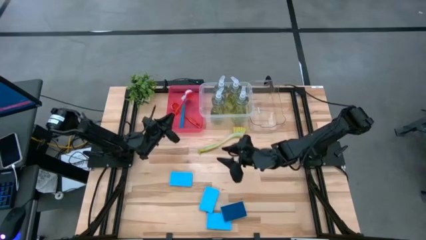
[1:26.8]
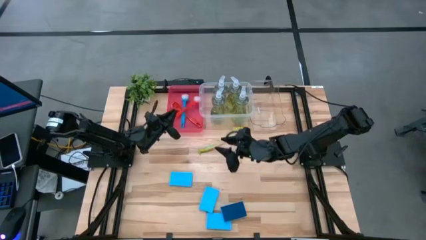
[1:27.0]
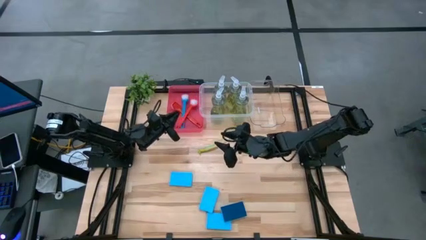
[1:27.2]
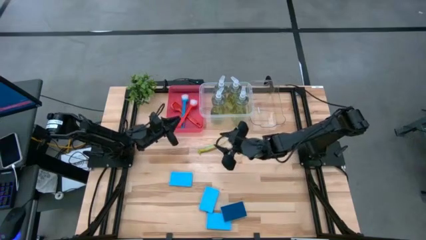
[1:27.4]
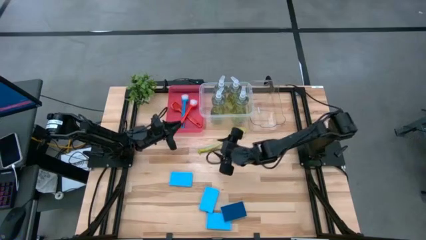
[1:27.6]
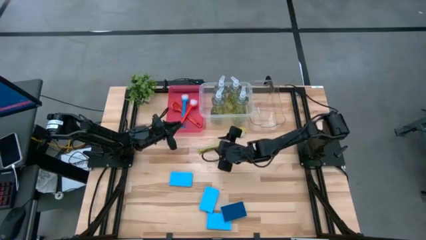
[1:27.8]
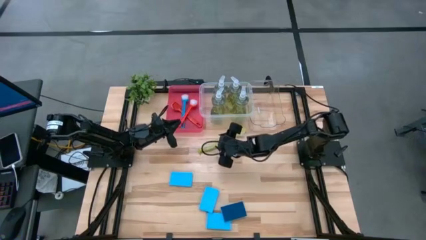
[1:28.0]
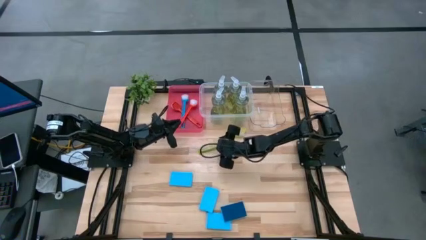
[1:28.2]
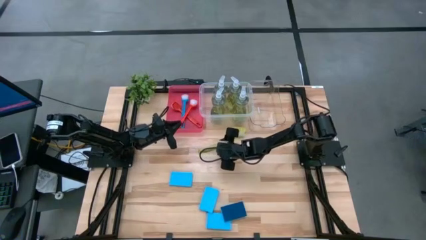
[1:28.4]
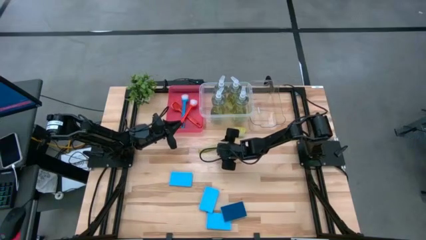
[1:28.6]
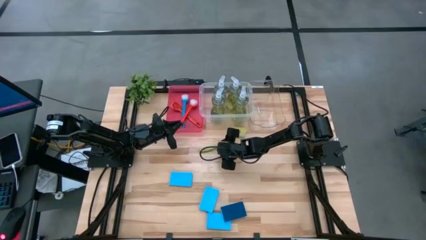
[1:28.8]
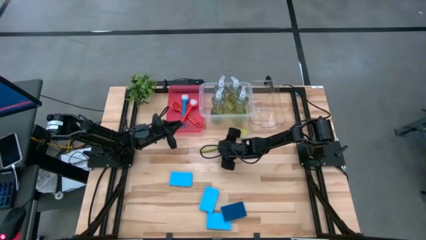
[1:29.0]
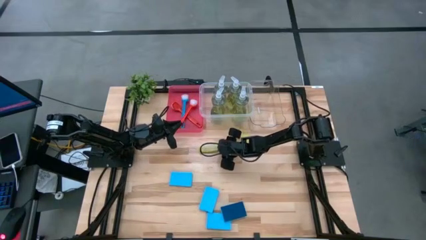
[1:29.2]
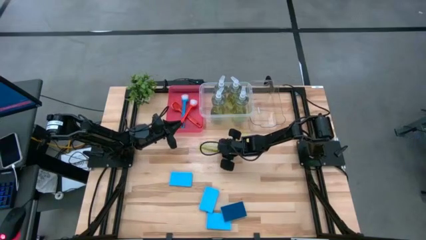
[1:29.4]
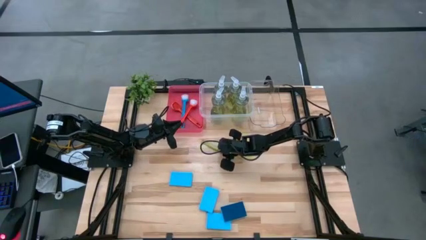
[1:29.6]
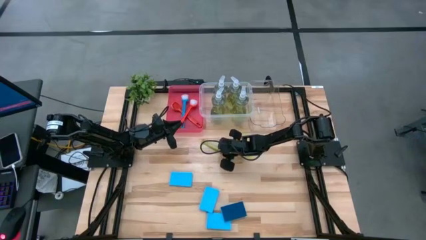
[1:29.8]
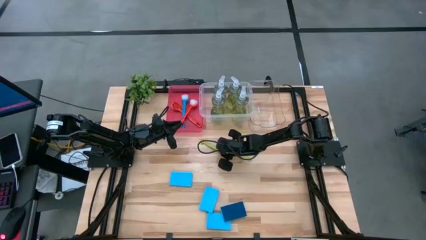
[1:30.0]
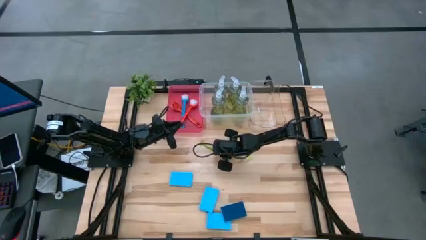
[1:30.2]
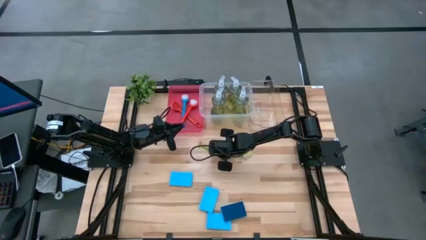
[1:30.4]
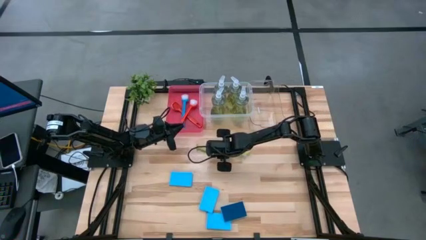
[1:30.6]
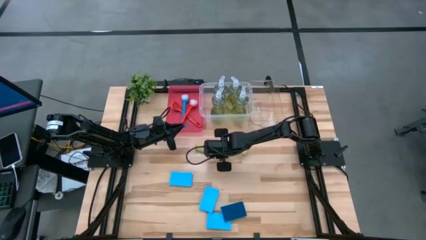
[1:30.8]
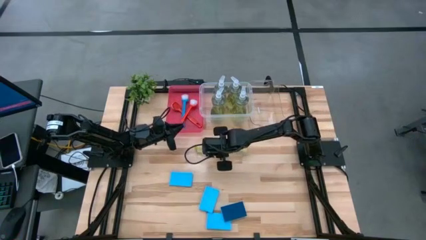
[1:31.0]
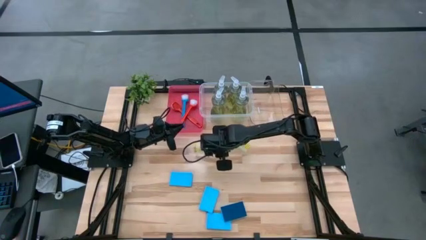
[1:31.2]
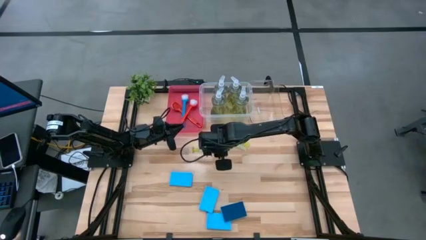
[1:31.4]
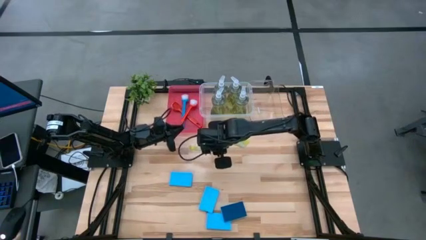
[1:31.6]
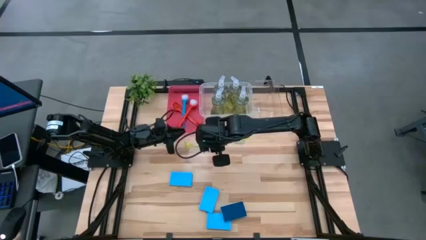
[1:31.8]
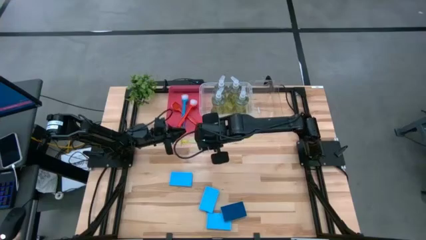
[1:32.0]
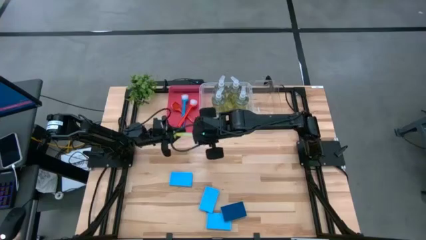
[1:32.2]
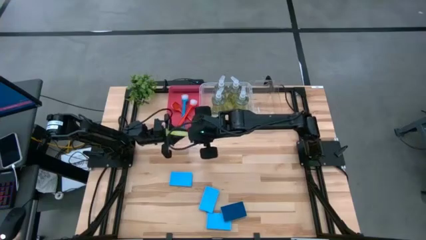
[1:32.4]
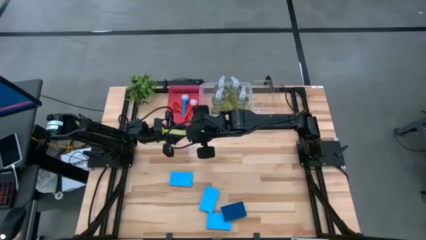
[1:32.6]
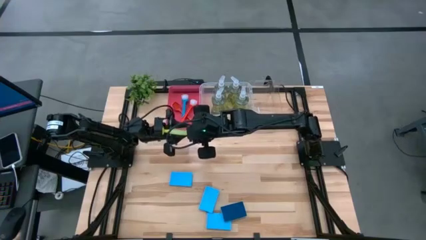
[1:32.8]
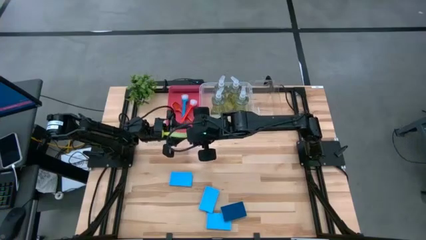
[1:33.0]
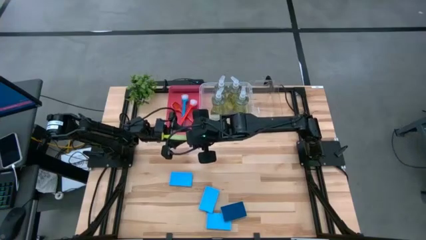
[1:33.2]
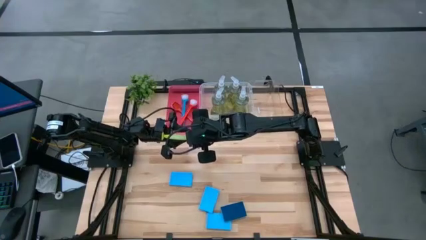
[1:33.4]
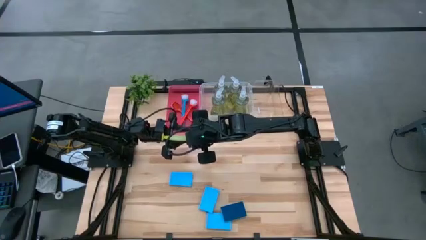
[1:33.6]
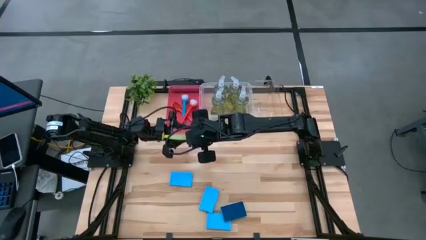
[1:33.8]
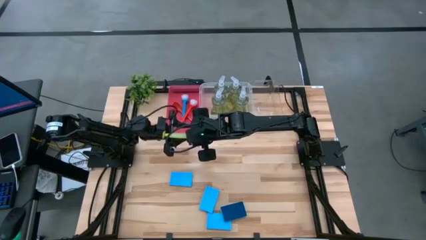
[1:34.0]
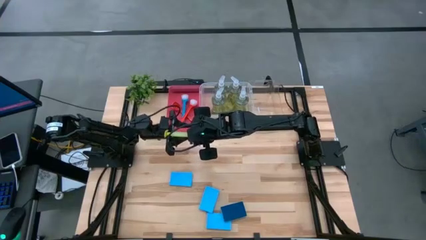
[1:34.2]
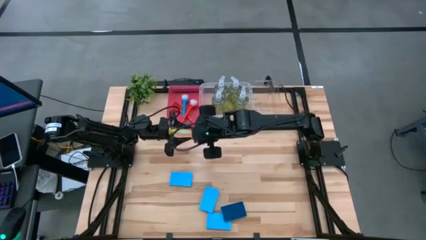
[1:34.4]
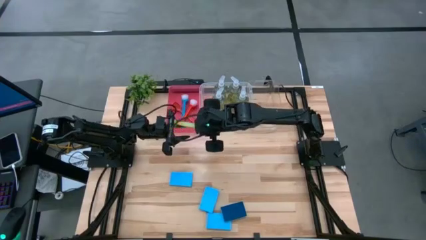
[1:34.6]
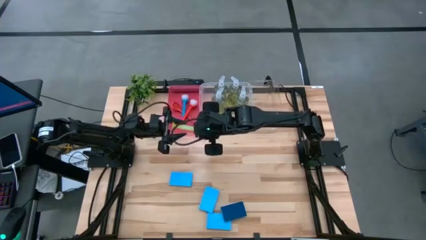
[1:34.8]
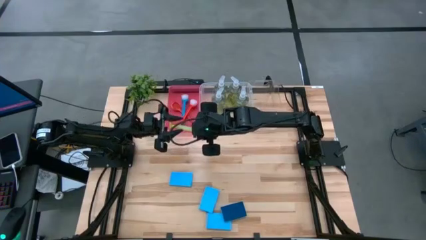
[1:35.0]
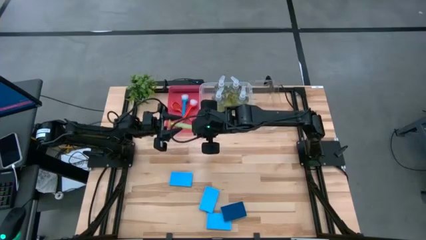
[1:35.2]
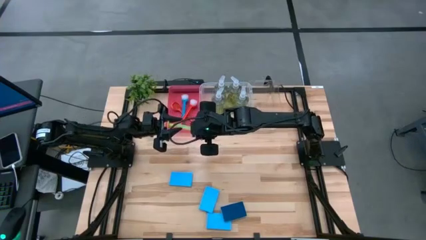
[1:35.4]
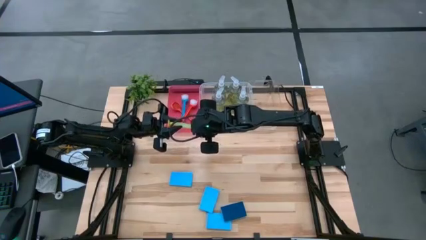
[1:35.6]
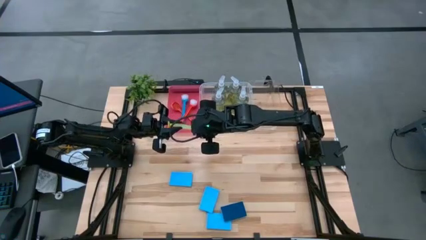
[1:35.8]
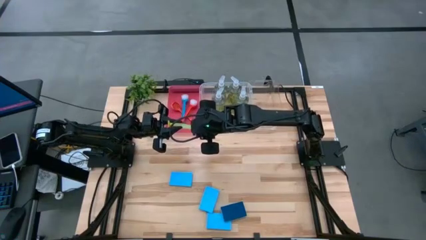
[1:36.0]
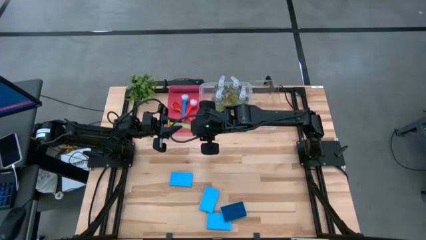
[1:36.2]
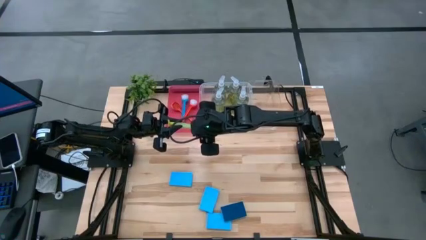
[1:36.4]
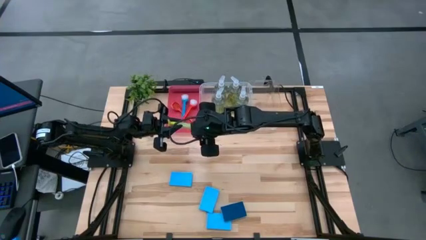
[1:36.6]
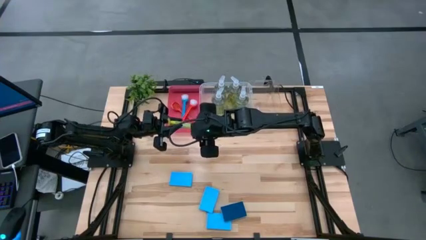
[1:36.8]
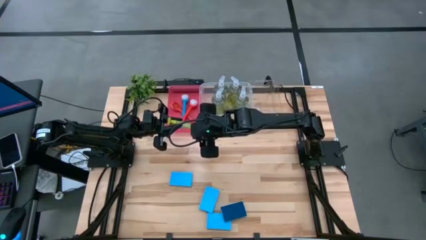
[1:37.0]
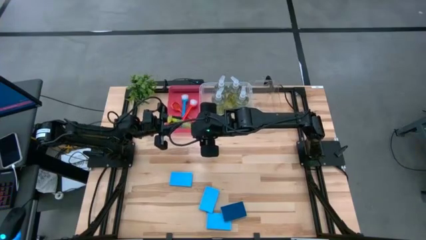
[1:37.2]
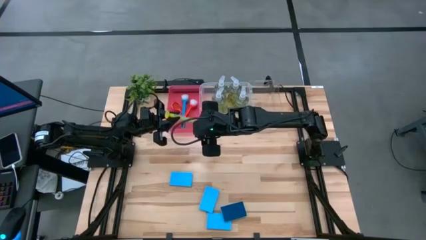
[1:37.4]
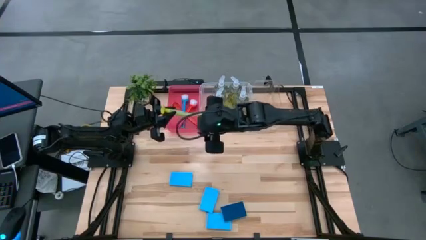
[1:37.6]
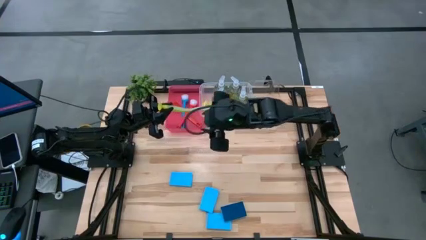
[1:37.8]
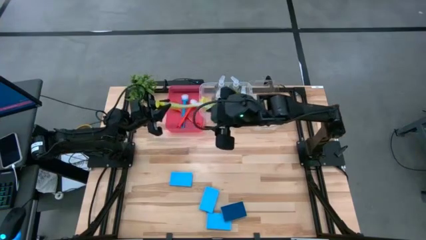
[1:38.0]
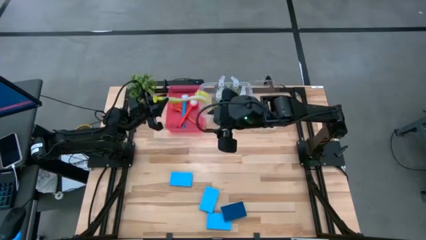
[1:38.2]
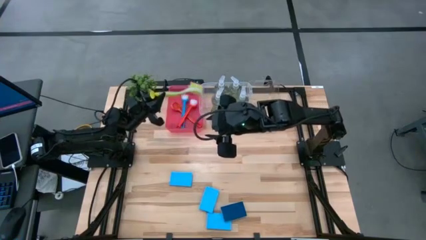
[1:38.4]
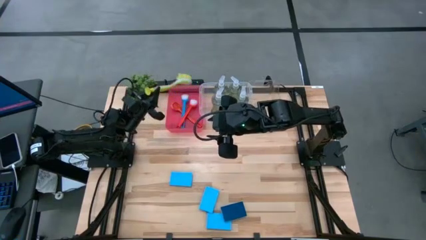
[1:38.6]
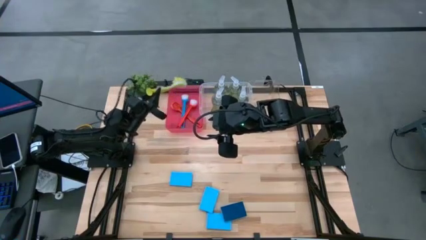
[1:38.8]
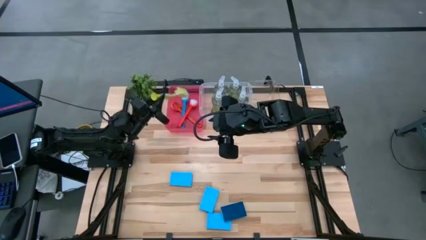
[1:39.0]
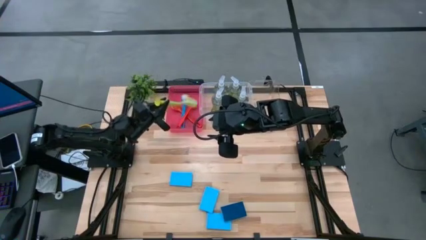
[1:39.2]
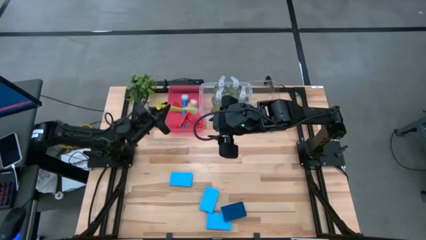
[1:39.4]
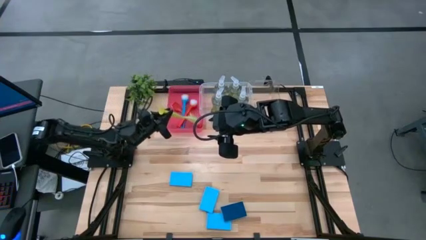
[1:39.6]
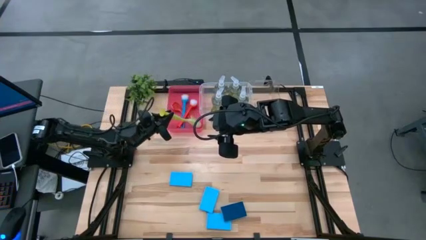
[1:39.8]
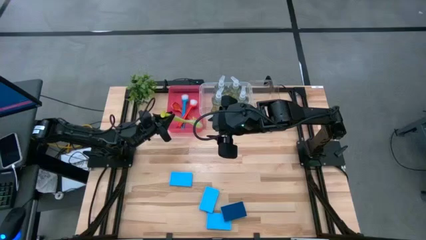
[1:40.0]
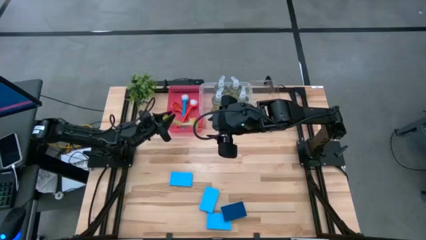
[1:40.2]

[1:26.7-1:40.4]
Task: Pick & Place Kitchen Sink Supplies
Put the green toilet brush into the red bin
